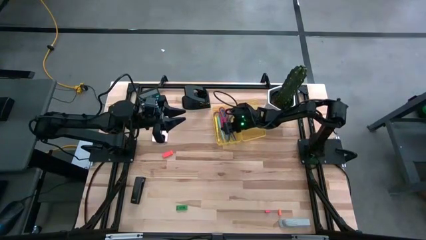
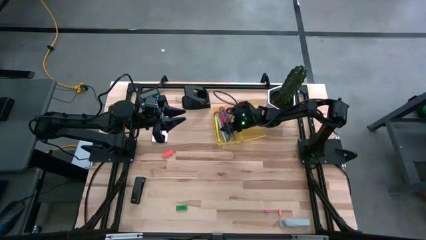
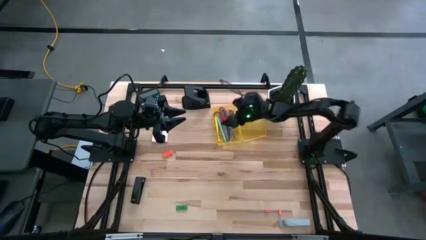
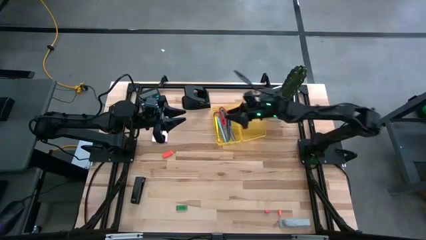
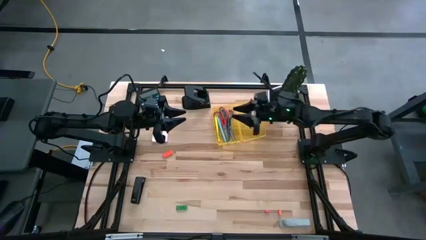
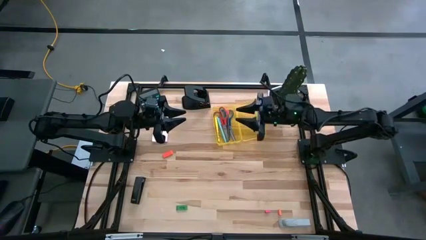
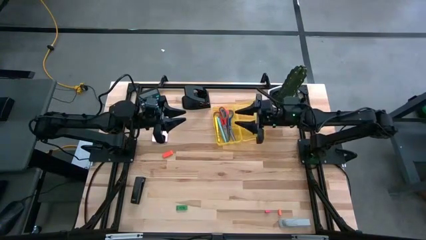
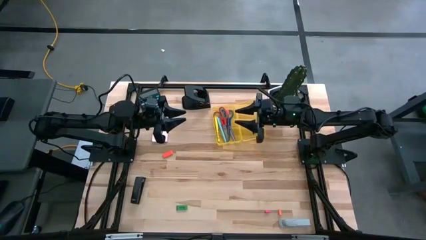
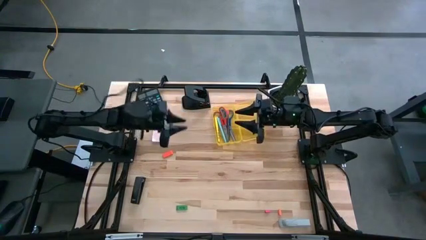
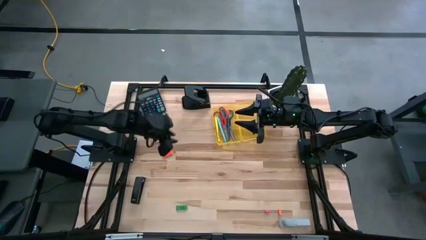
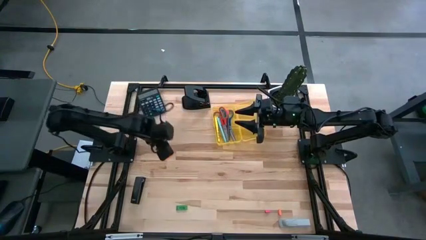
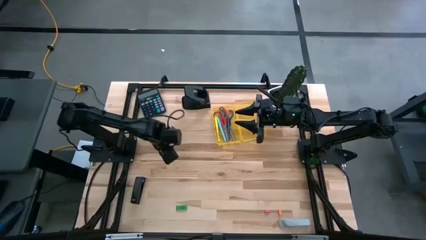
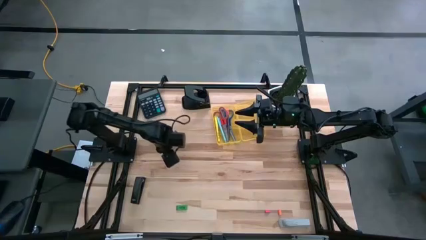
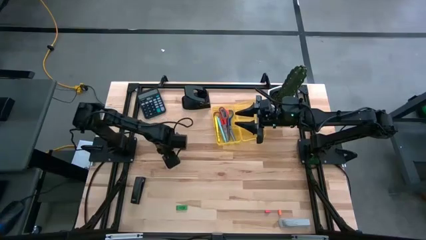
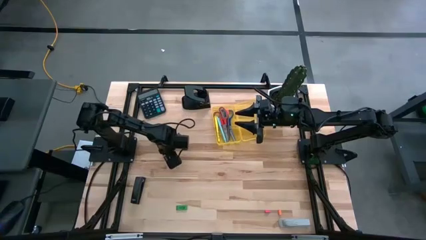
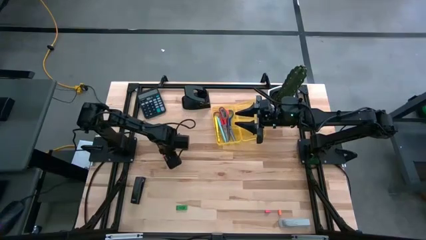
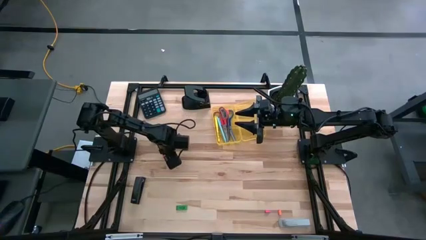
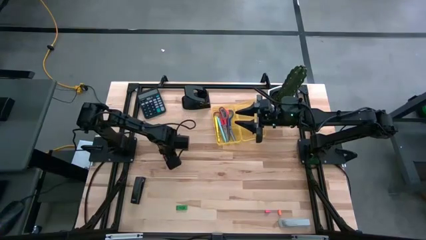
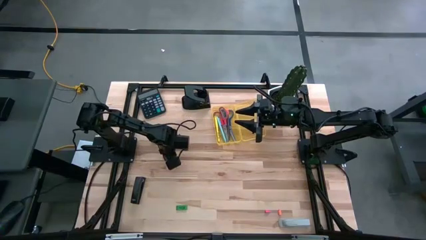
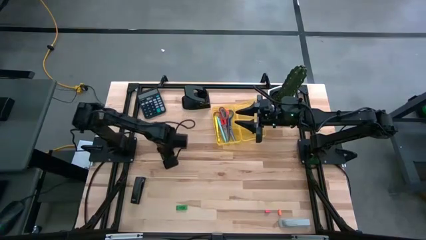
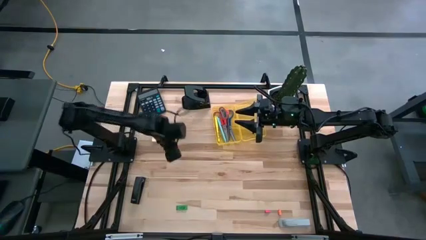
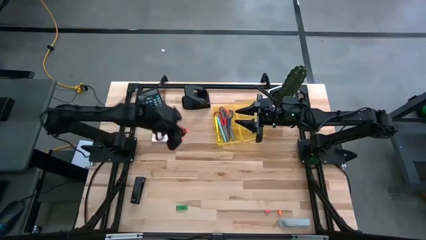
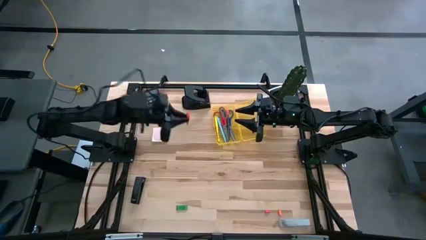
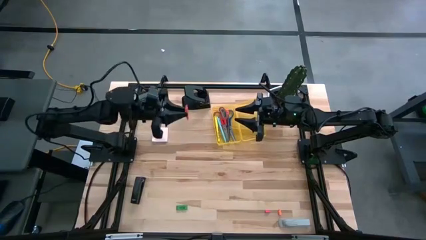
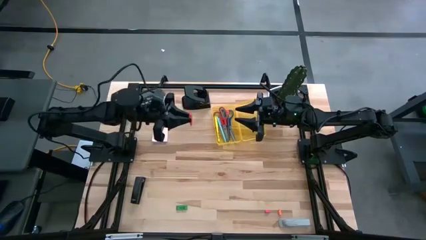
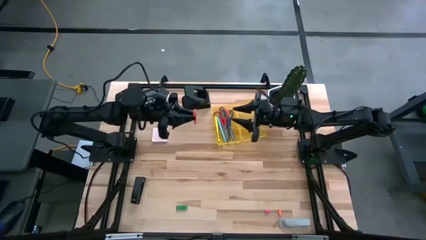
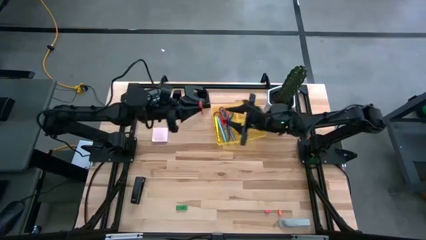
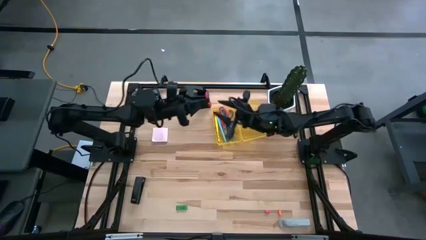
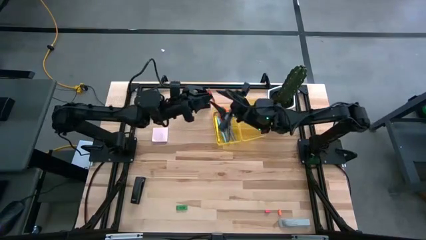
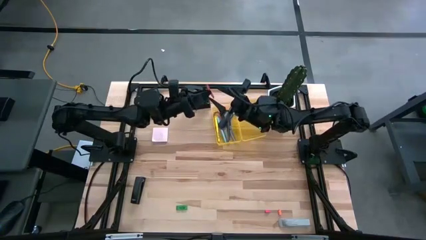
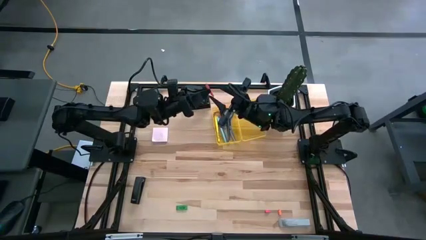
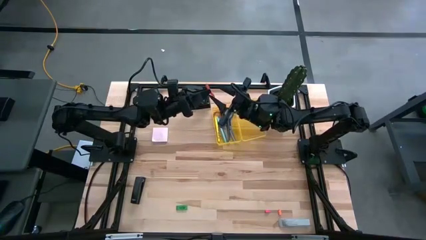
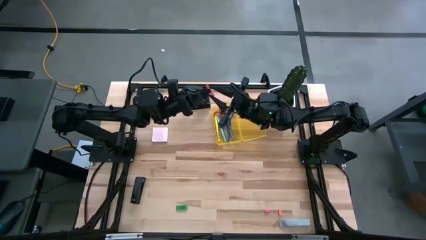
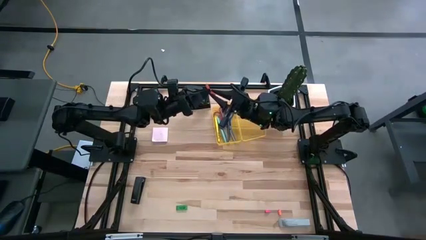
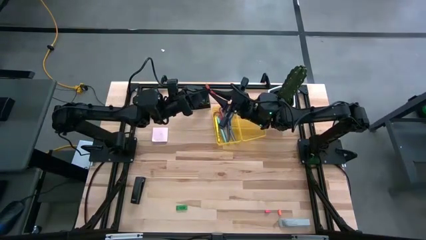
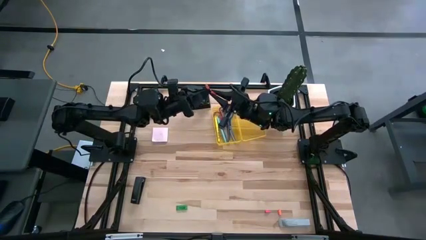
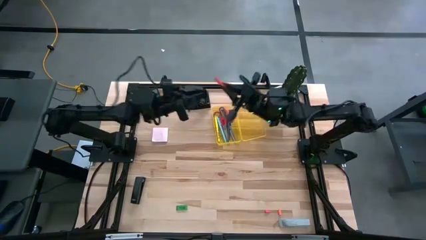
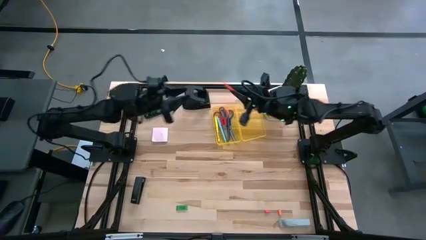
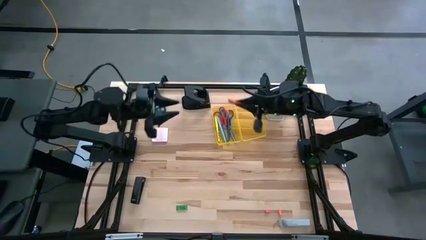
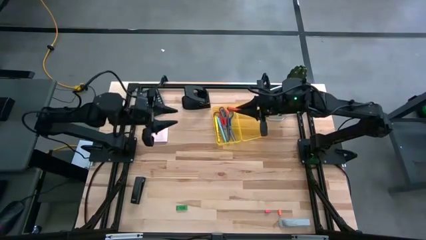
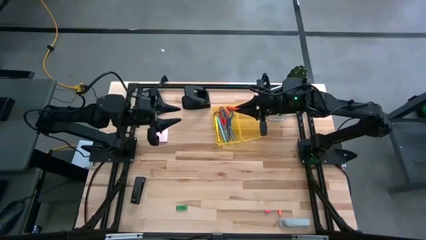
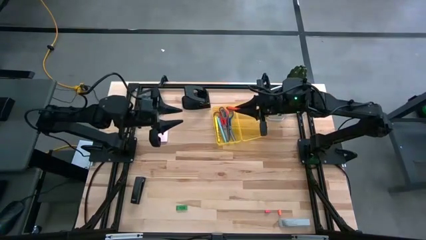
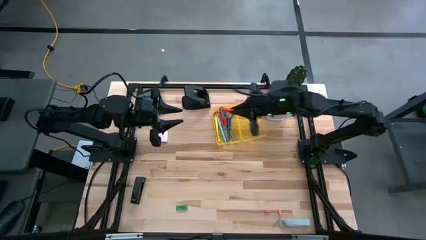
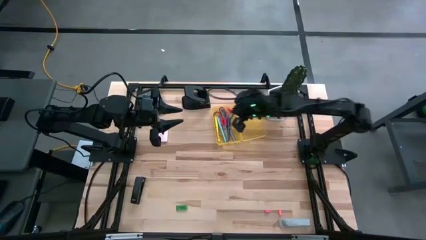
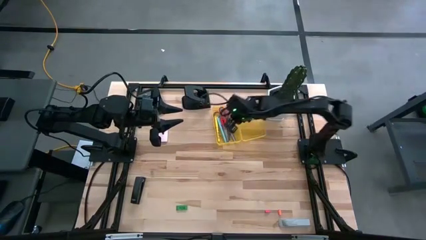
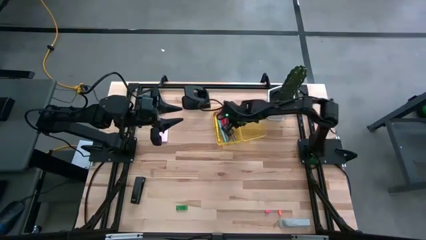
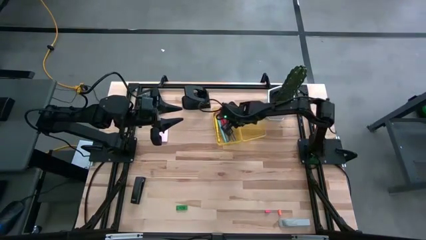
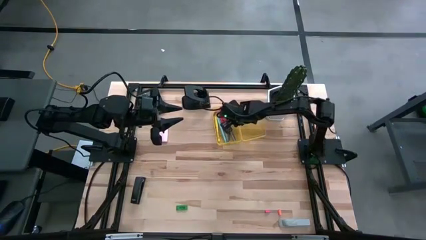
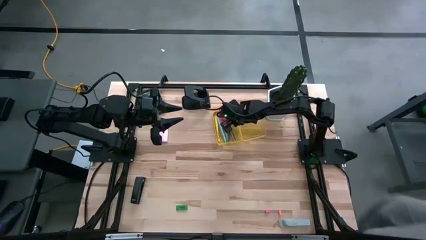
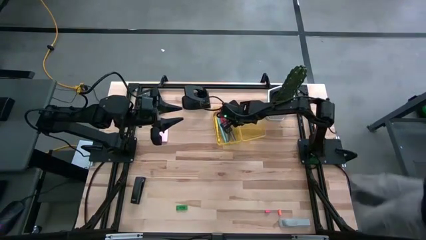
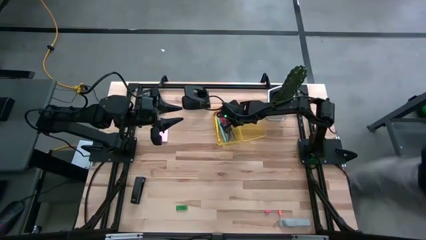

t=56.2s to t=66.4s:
Task: Pack school essentials
Put the orange eraser into the yellow supply box

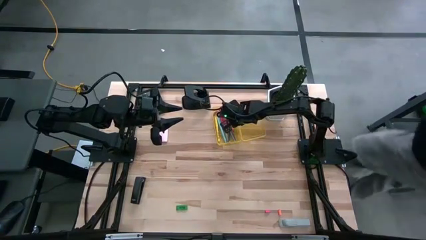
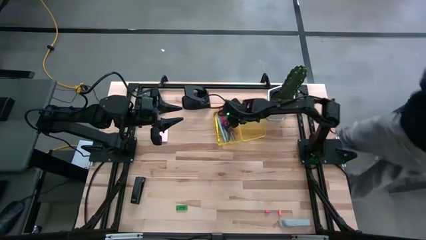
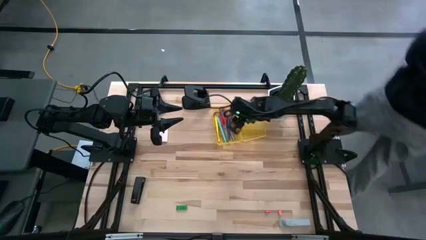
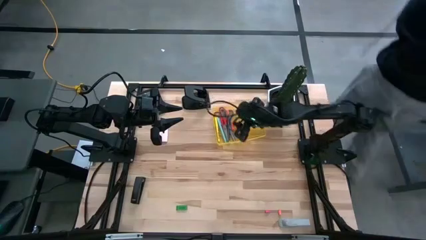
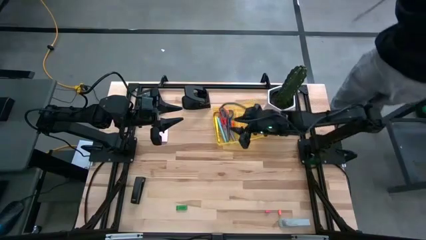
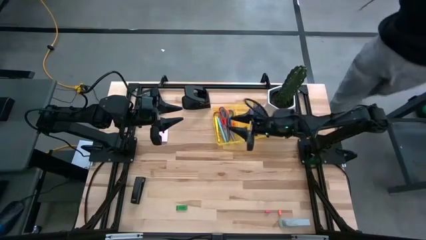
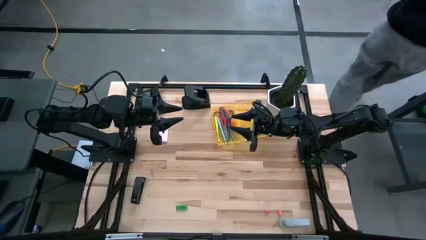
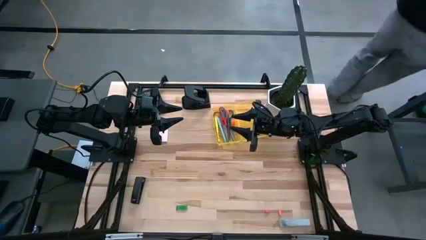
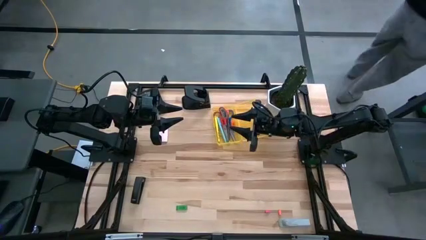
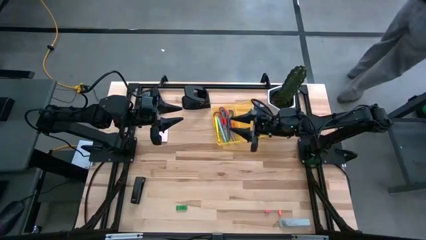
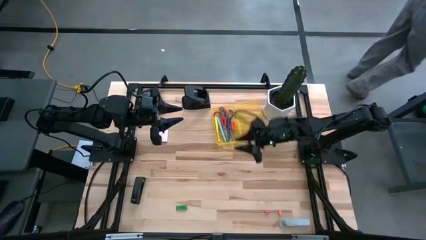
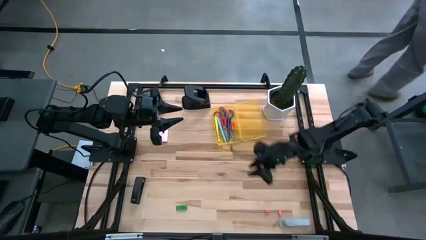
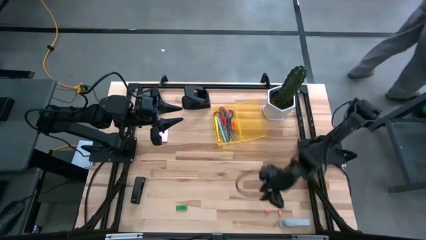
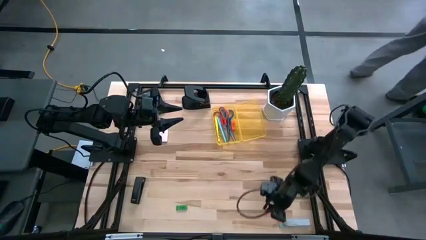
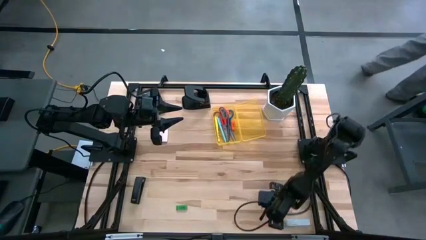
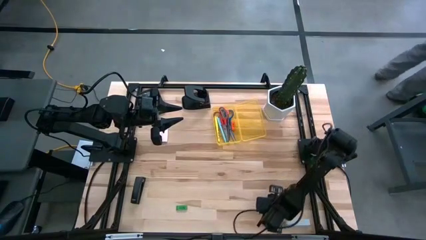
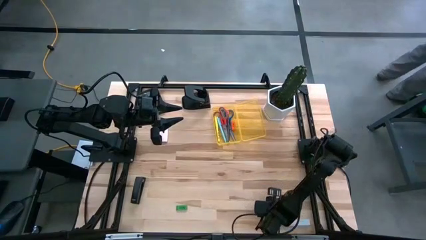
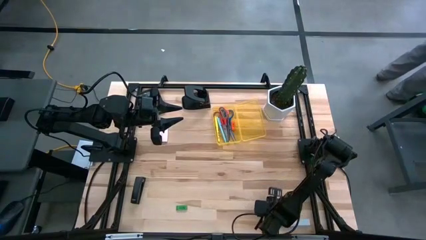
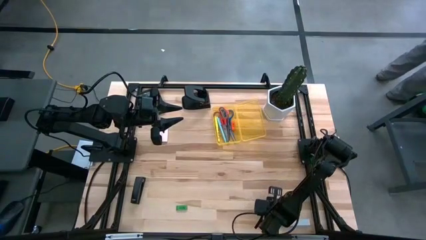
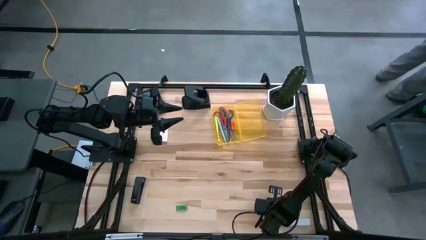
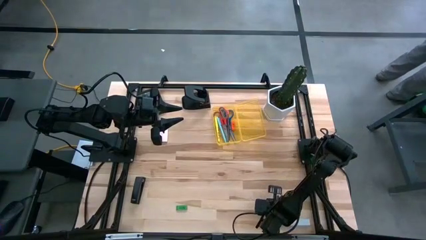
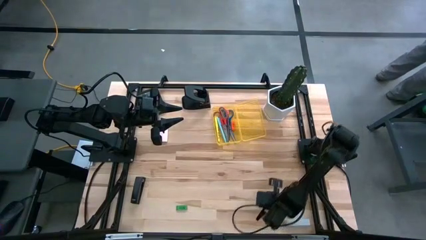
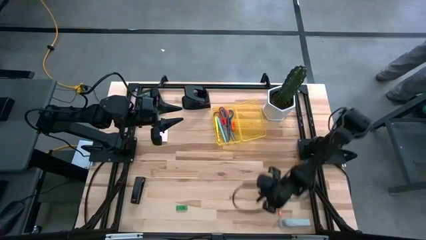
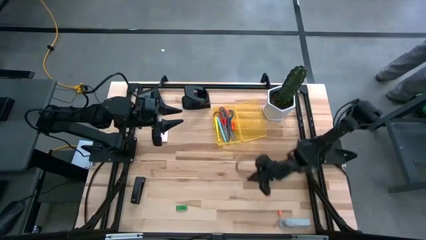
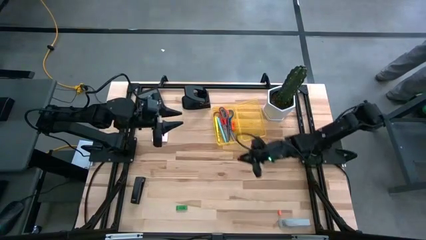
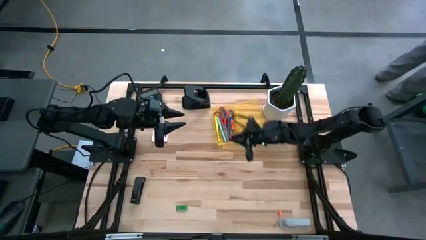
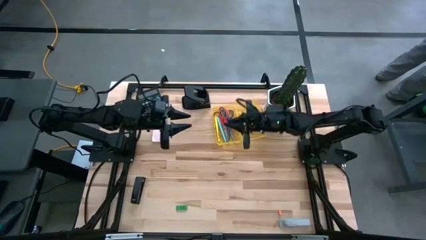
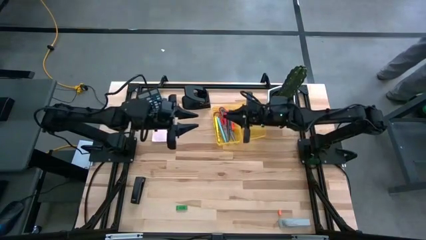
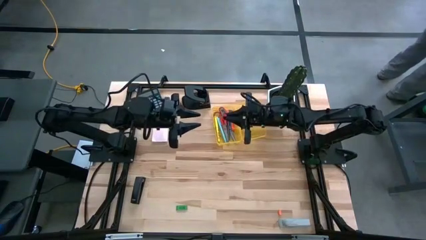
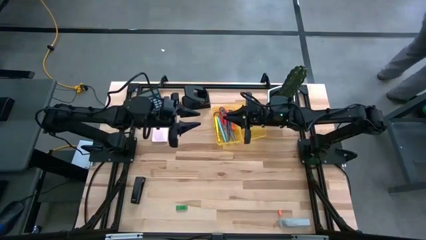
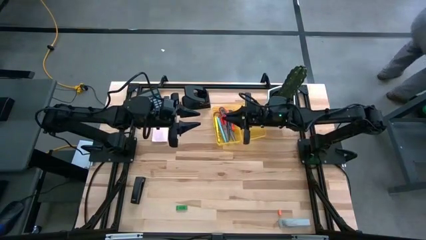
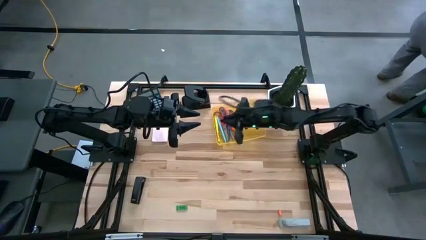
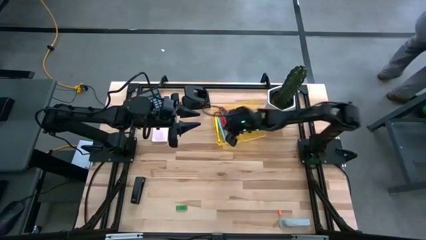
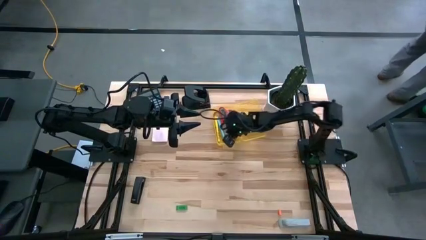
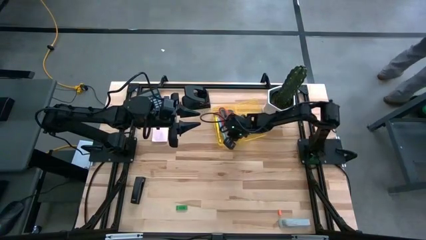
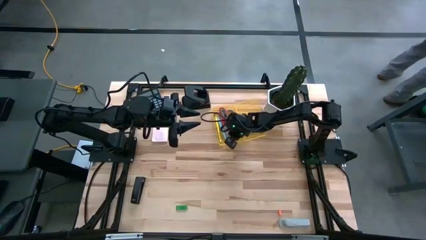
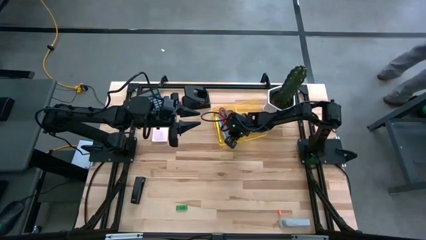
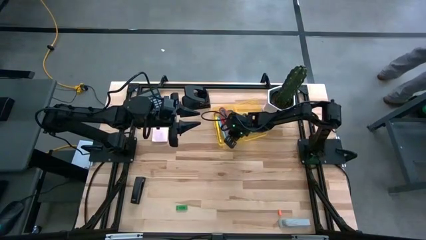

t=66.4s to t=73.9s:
Put the pink small eraser into the yellow supply box
